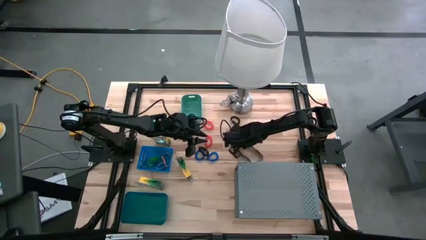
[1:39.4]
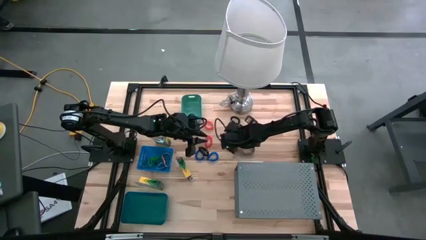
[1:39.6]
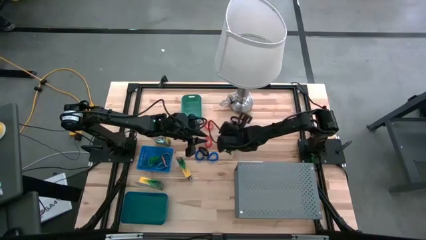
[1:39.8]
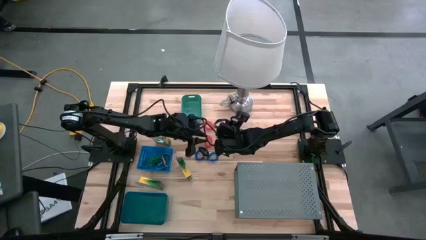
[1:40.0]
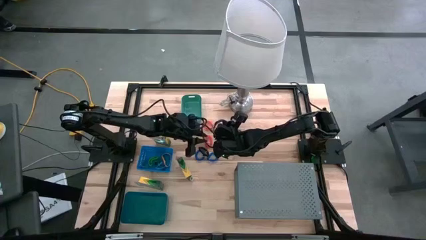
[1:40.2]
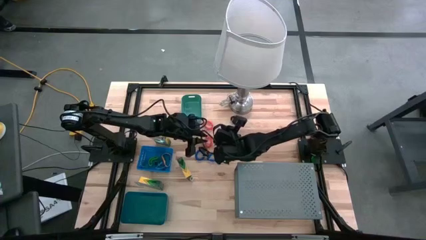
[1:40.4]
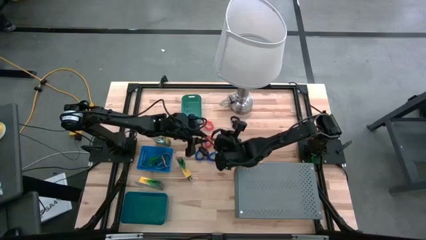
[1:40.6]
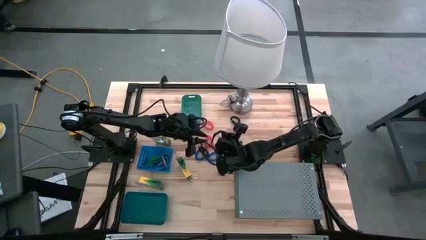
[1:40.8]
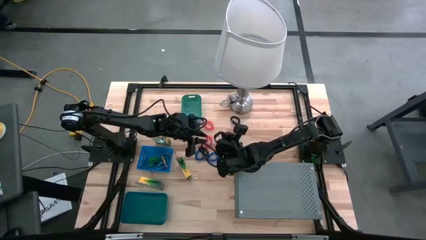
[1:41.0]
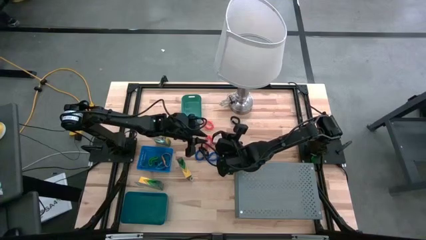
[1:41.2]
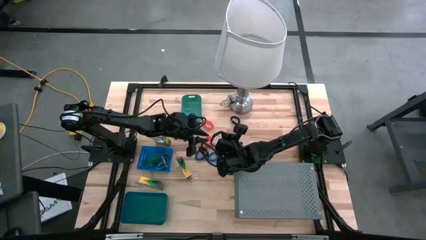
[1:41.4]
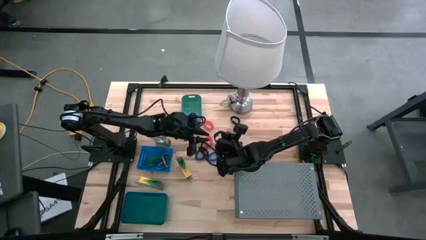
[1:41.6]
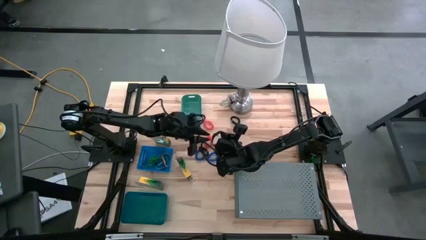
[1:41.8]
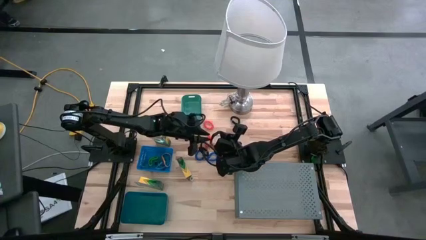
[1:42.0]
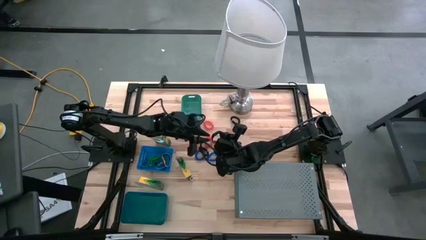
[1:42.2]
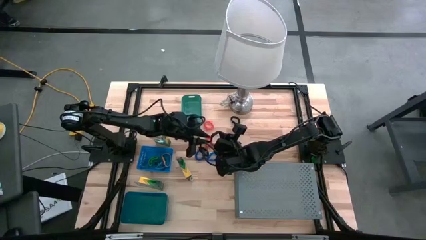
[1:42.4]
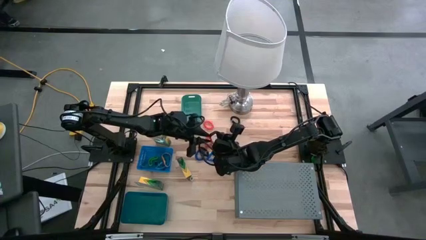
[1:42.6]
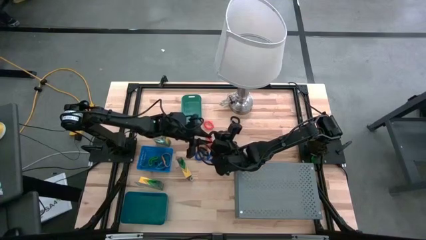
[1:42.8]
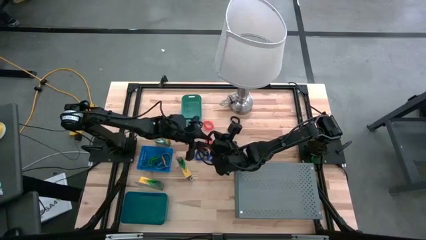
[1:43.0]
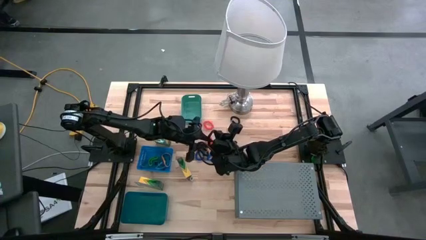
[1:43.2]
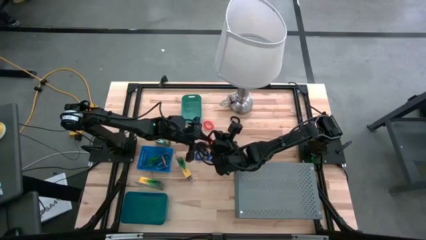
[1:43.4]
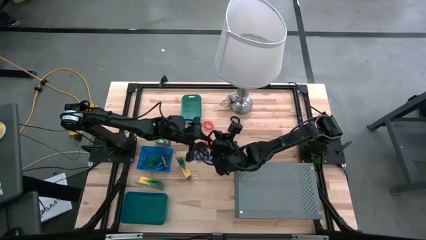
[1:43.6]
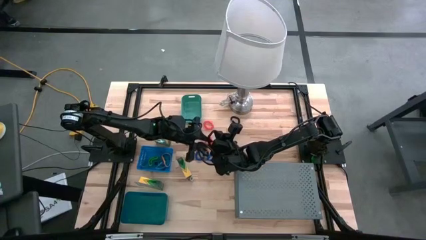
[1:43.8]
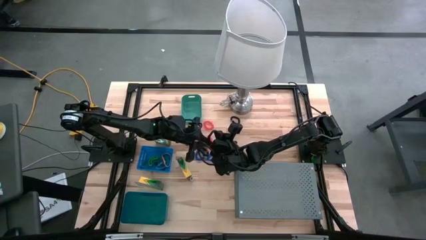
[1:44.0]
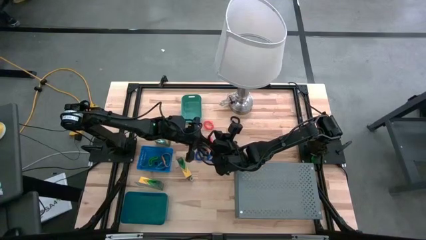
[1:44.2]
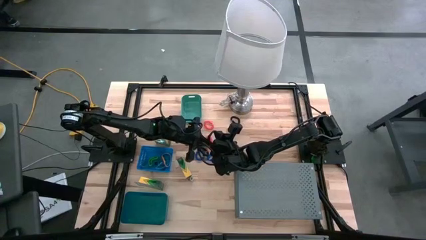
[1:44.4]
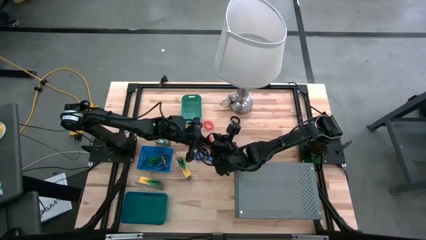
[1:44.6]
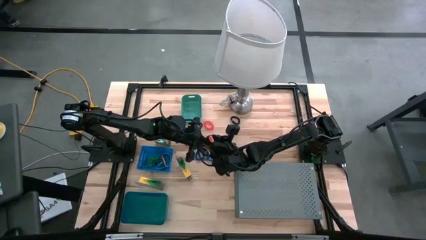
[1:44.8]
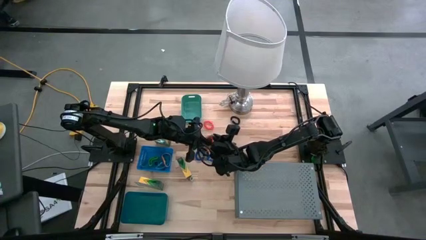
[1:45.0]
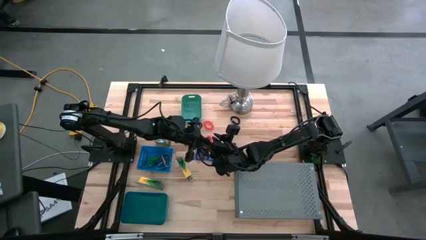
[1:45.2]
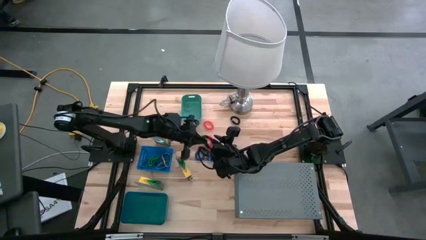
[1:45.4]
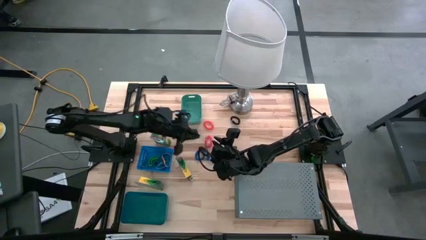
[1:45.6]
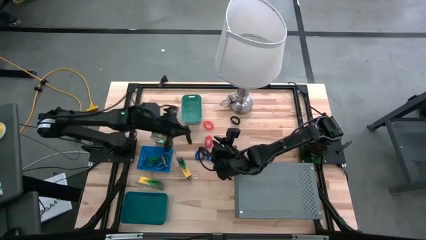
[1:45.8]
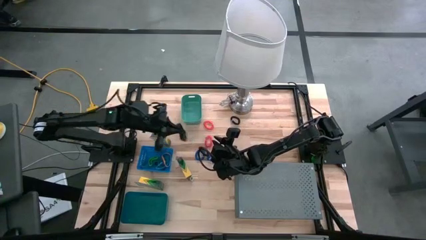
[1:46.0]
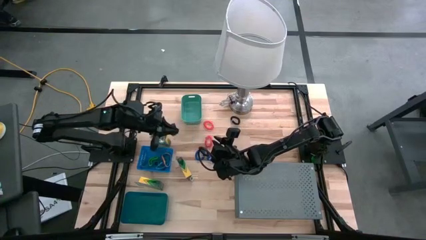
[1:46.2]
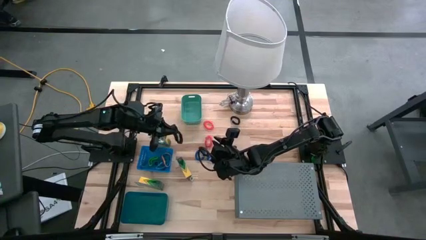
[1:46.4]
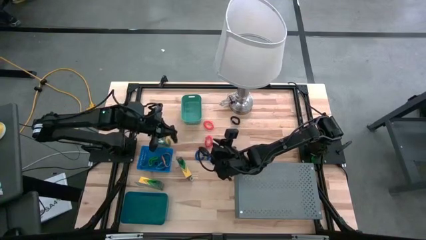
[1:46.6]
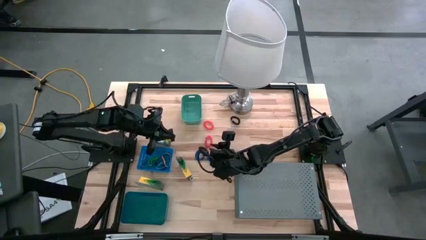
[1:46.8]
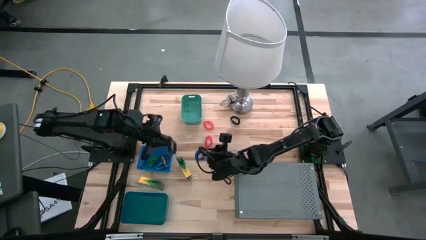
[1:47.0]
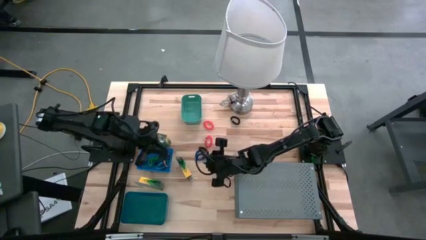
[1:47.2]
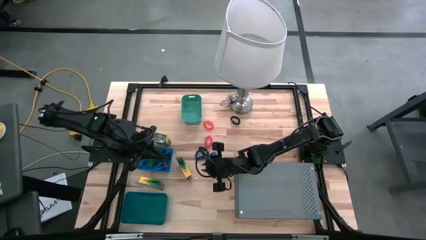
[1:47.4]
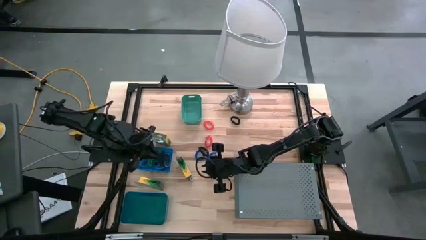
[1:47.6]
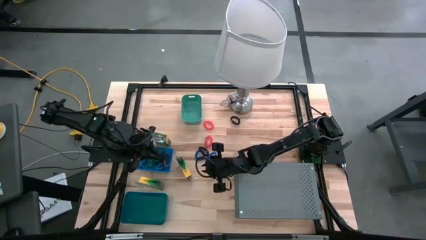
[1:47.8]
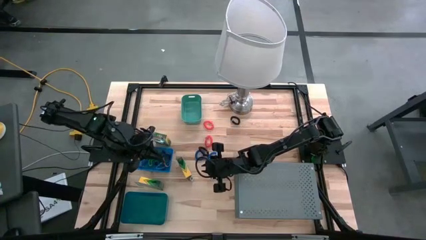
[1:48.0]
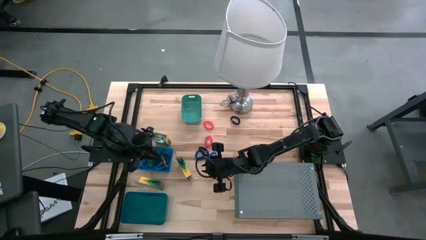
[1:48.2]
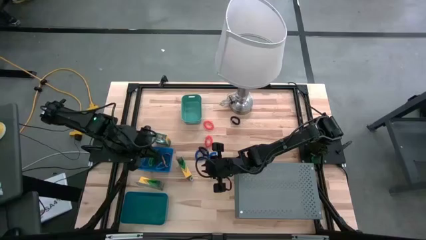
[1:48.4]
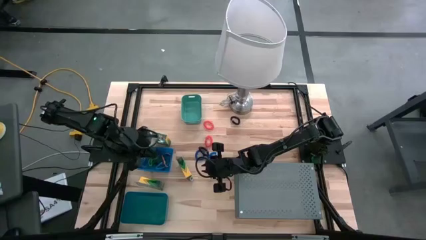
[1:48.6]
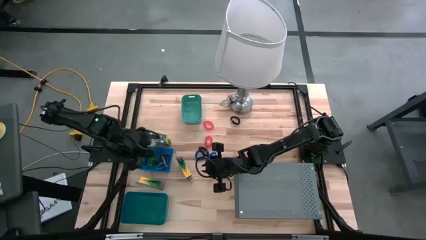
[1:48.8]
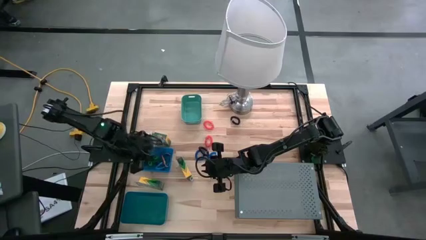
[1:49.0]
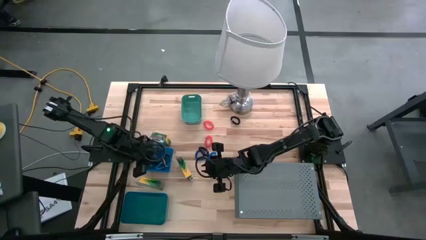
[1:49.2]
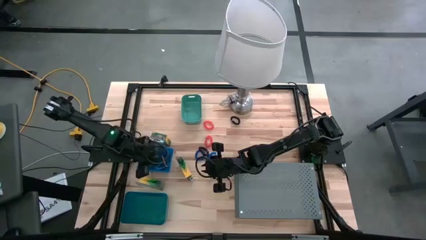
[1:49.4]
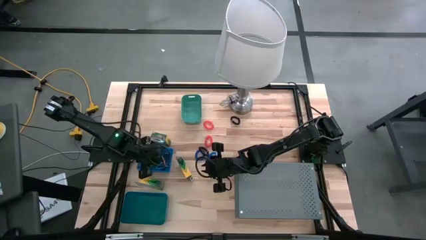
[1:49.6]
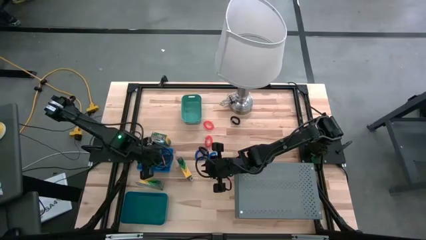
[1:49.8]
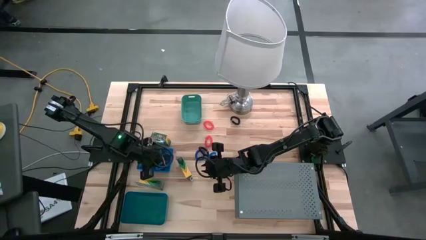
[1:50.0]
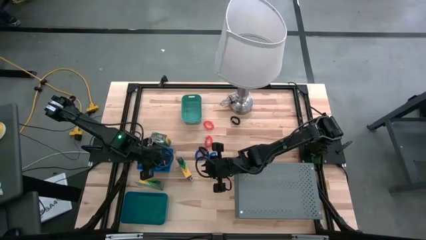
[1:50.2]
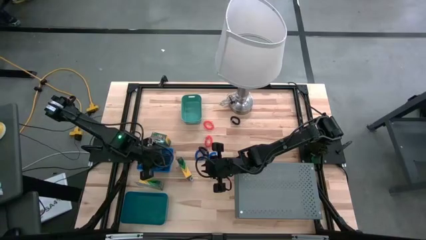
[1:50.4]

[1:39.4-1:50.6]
Task: Pick & Place Office Desk Supplies
Put the black rubber bands into the top blue bin

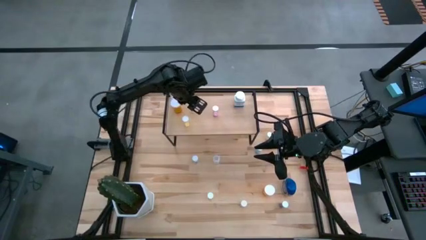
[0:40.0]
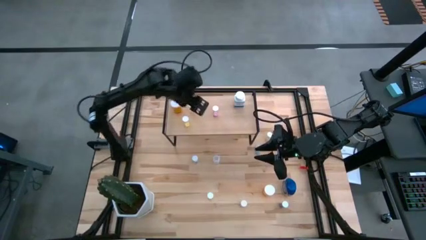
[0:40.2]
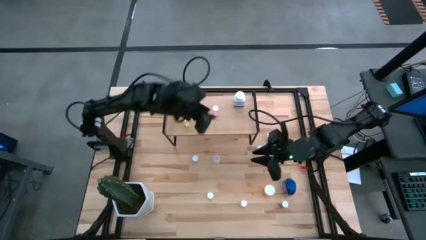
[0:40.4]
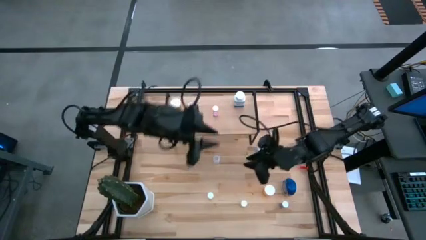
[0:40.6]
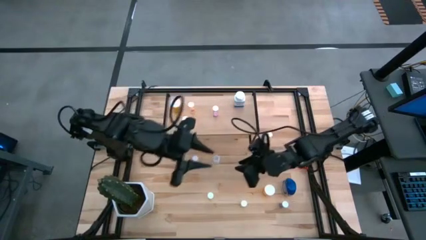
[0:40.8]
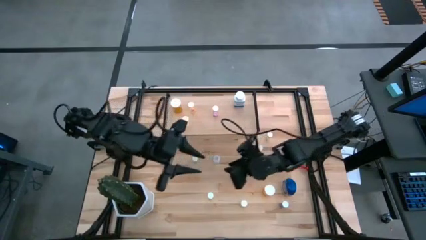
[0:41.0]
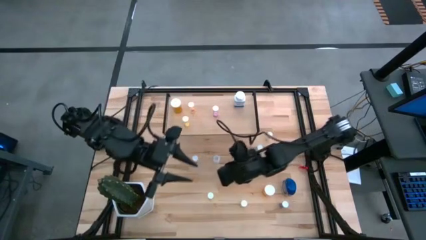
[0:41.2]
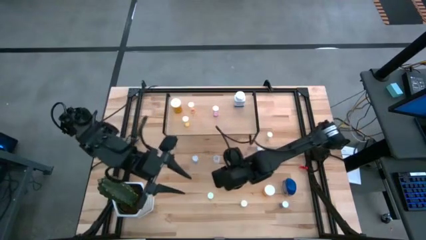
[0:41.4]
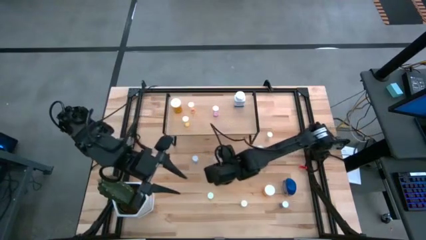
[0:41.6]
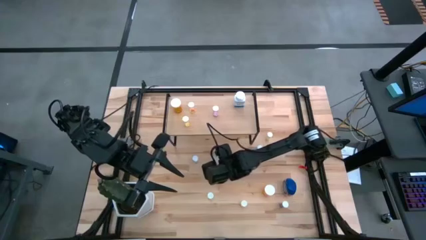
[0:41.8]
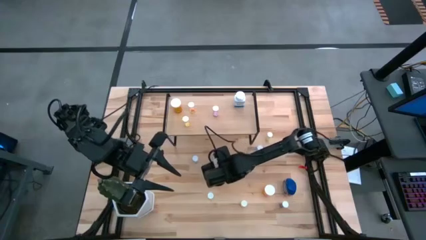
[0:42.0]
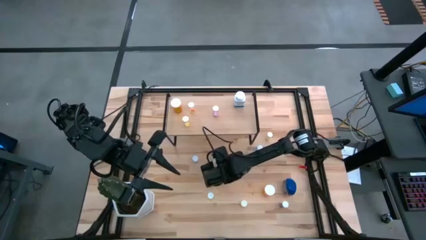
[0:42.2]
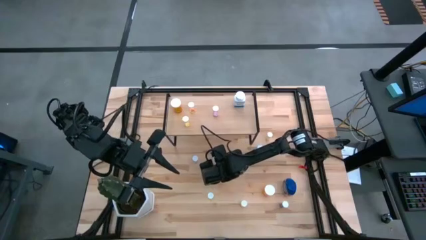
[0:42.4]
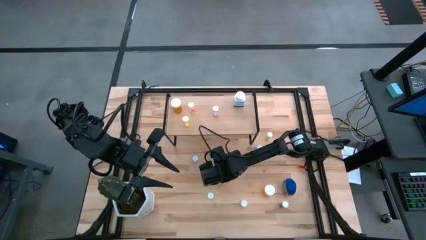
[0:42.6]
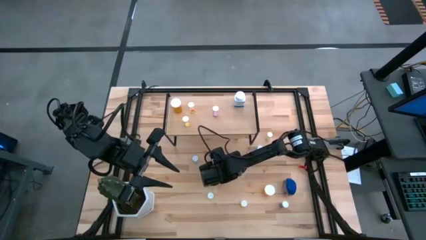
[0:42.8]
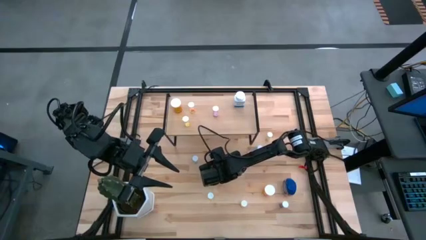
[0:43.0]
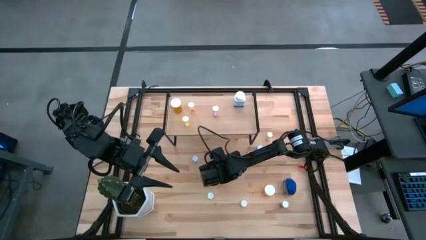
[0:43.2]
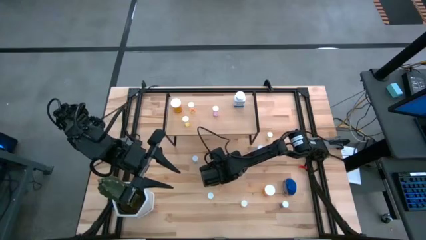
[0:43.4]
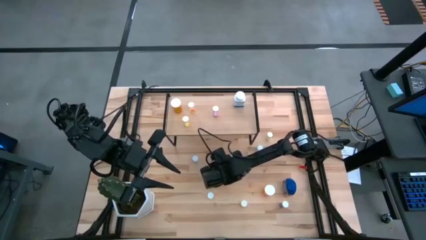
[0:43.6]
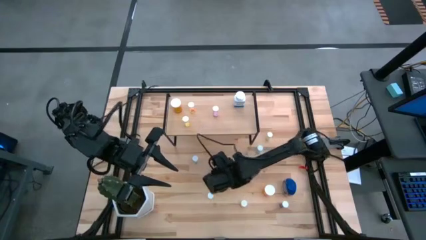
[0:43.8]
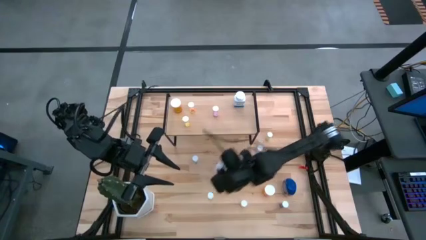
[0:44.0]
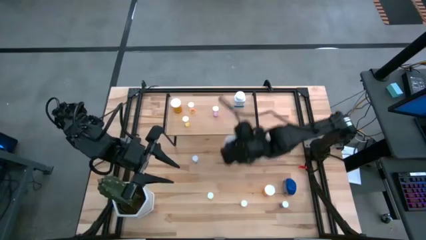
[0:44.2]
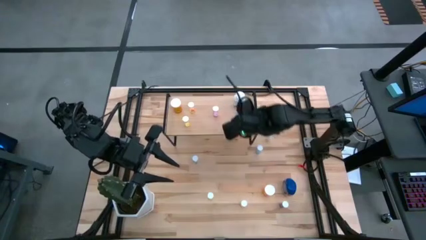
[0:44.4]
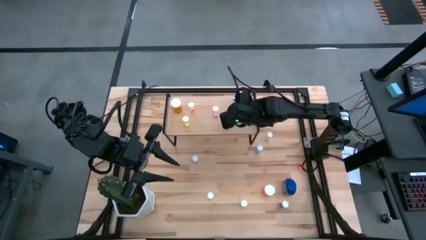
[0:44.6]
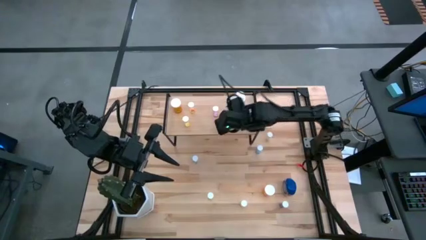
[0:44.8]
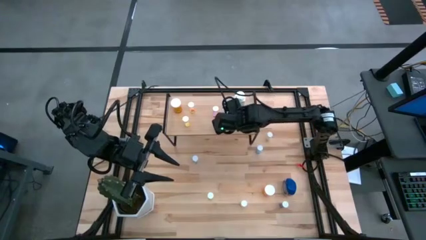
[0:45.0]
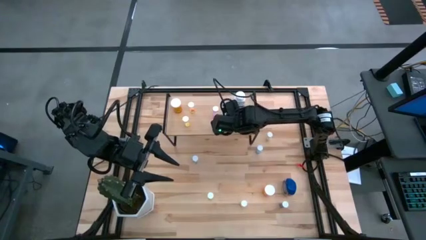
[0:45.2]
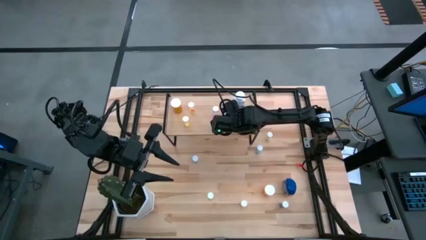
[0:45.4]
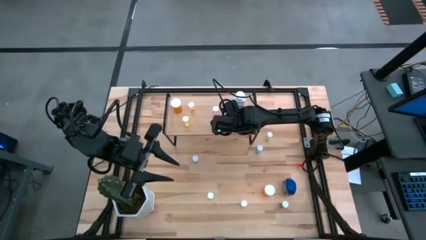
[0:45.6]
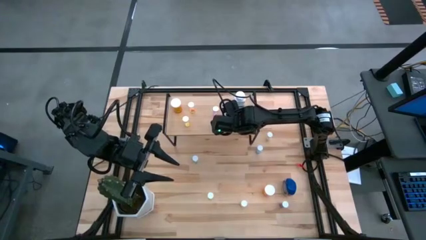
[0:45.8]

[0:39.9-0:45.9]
Task: Pick and place medicine bottles onto shelf by color
Put the transparent pill bottle on the shelf
